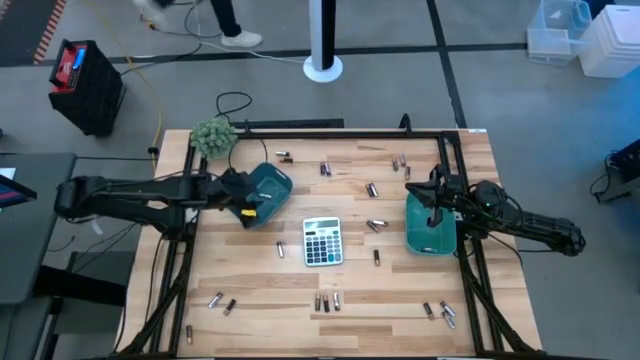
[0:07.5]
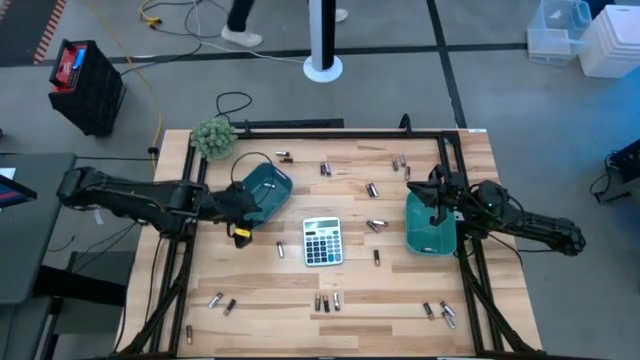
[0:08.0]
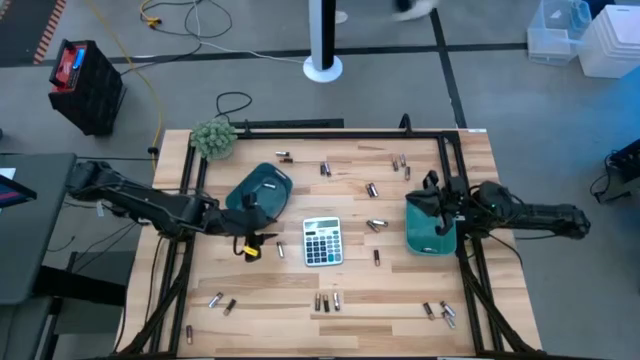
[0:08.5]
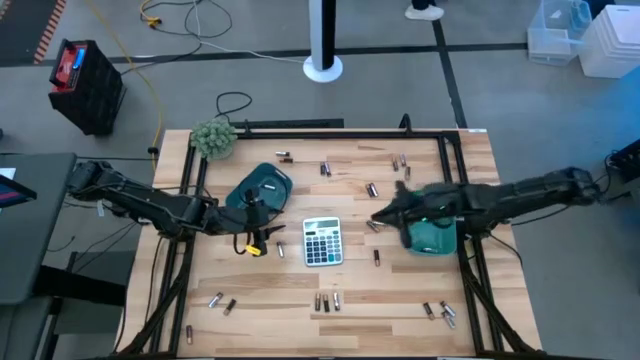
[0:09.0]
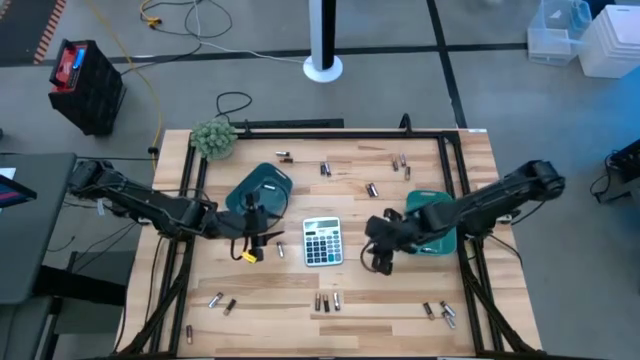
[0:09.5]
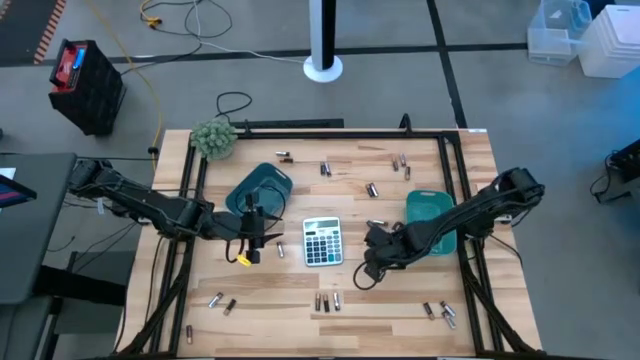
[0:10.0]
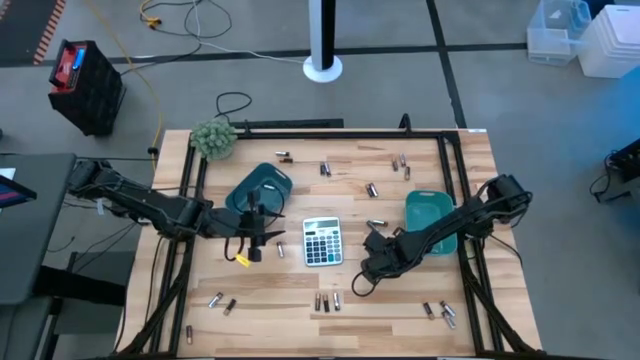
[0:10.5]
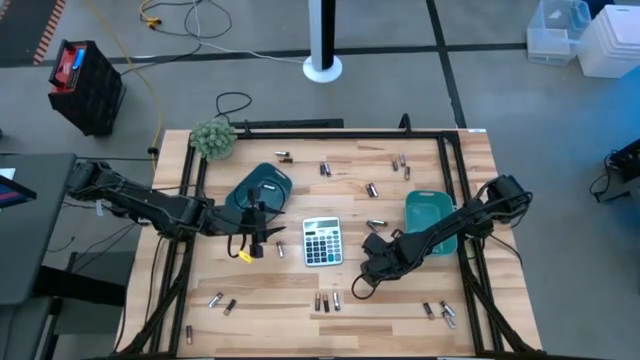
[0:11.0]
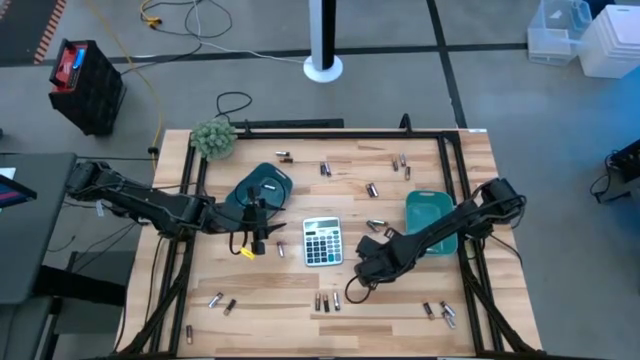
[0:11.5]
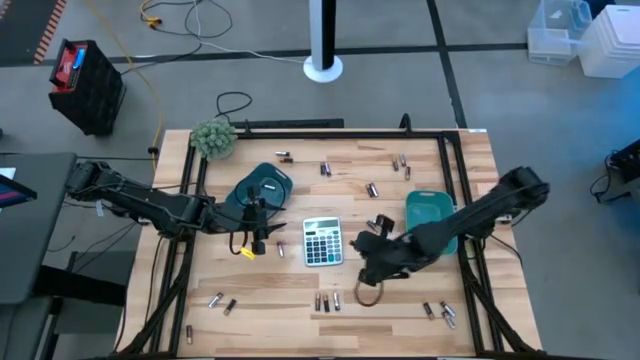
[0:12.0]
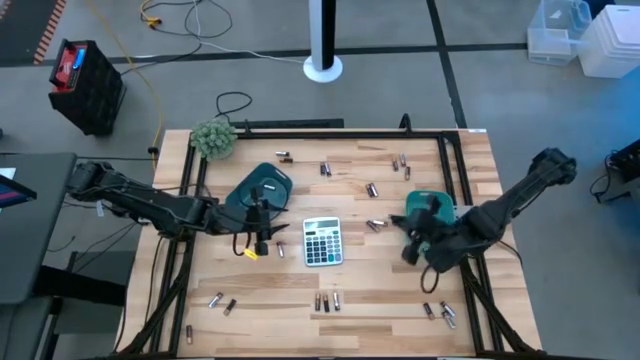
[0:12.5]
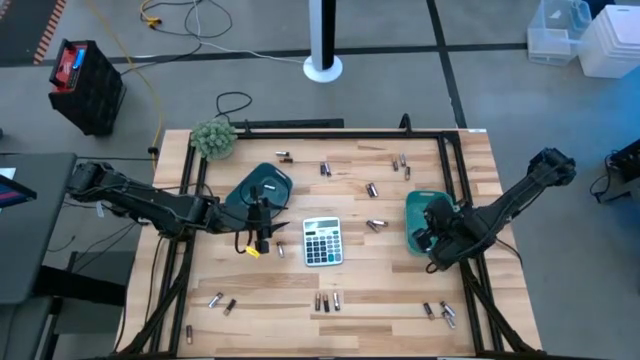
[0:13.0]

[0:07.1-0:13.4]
Task: Sort batteries
Put the brown/black battery into the green bin

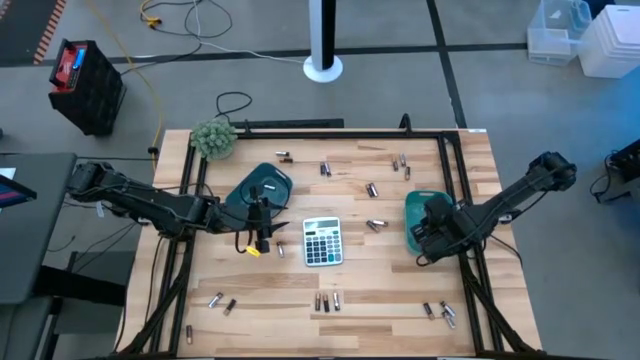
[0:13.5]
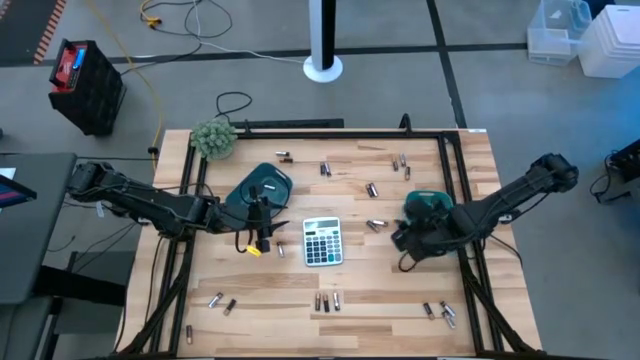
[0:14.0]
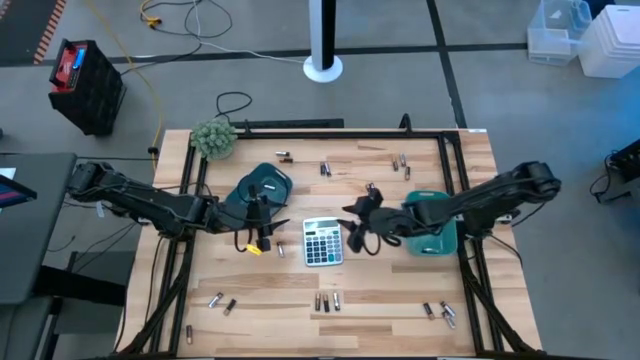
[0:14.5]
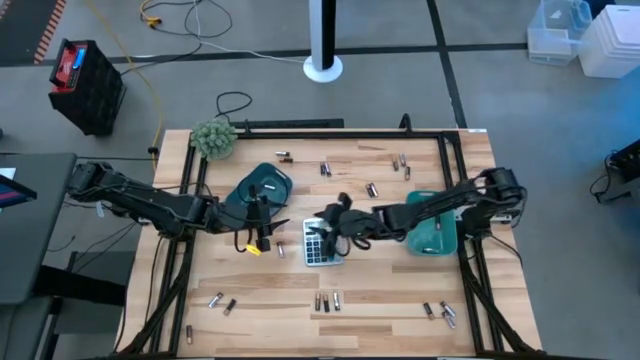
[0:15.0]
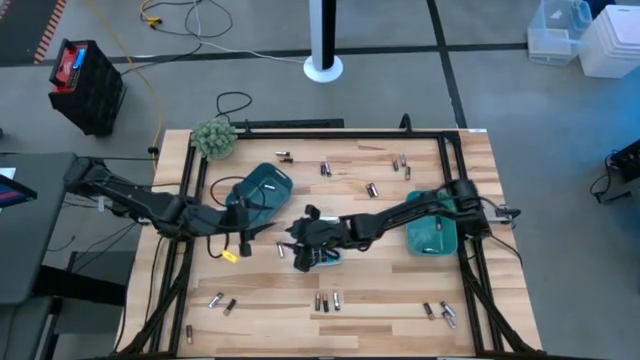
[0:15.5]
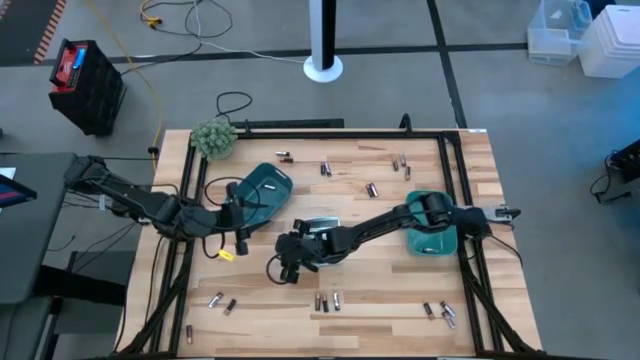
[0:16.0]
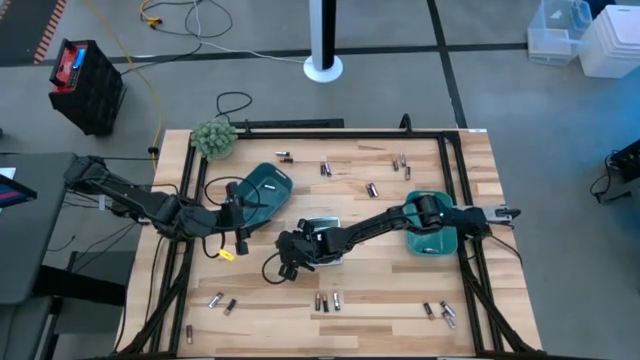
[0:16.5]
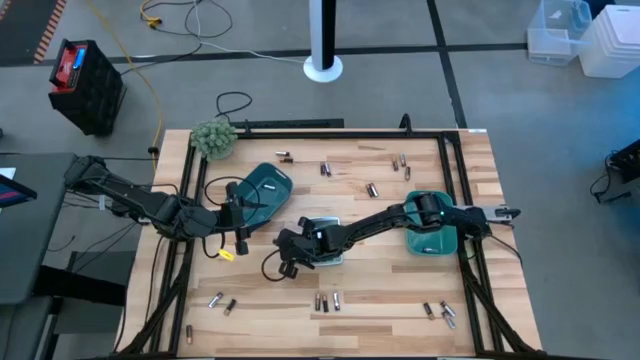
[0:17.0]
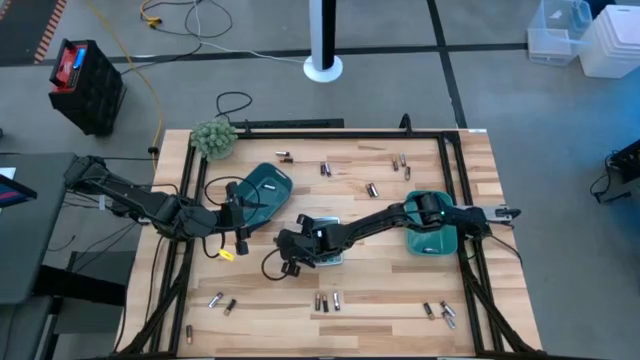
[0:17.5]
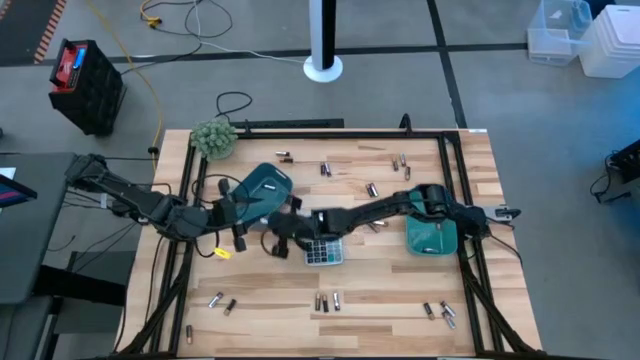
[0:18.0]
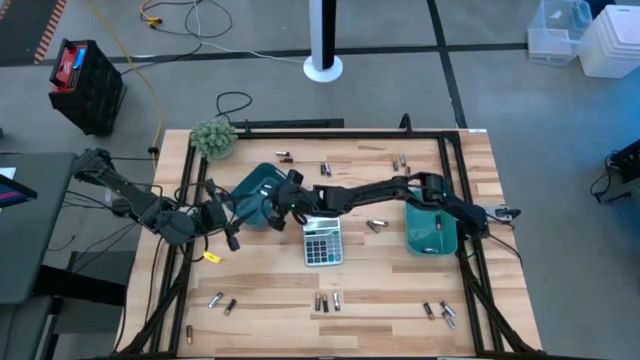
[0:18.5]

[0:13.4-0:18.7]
Put the silver/black battery into the blue bin

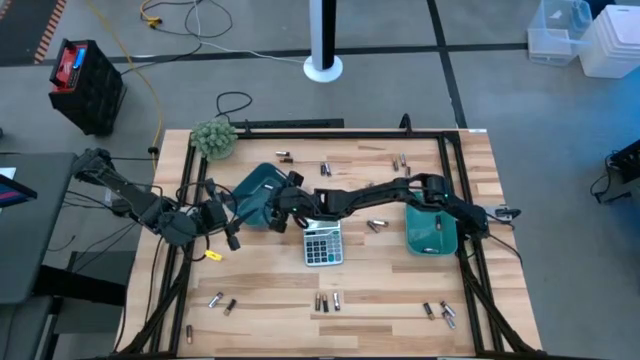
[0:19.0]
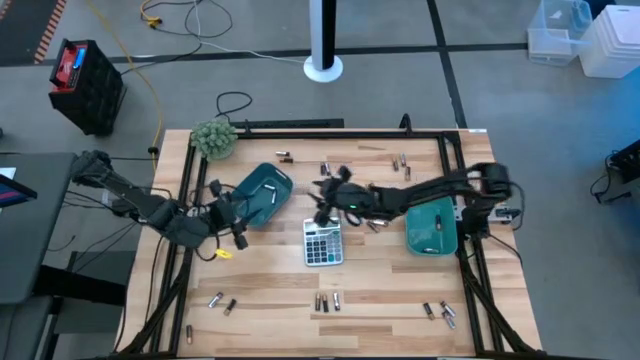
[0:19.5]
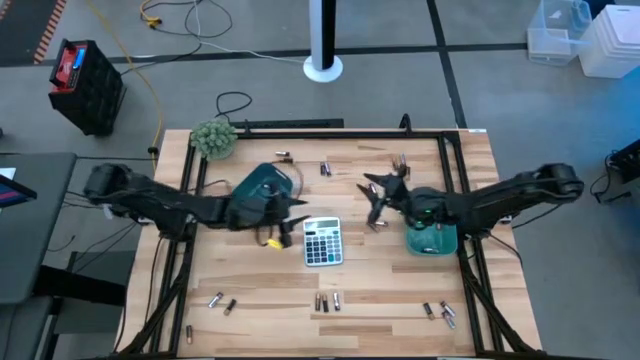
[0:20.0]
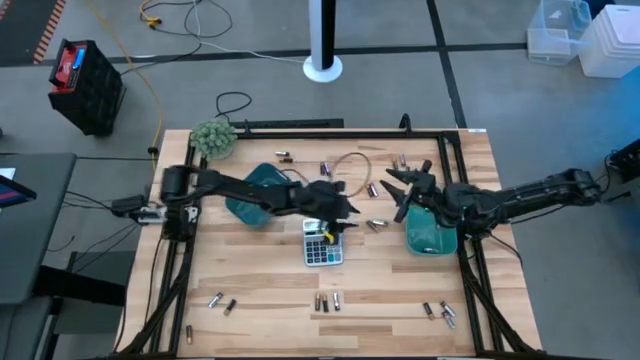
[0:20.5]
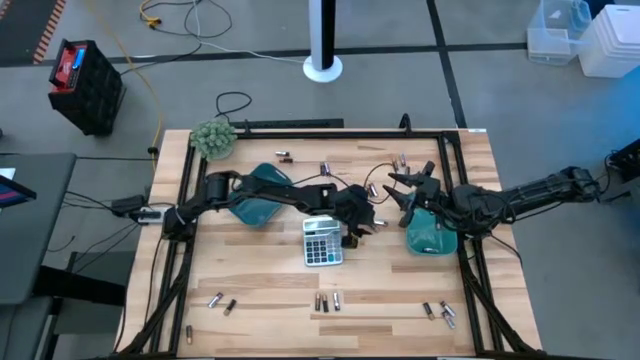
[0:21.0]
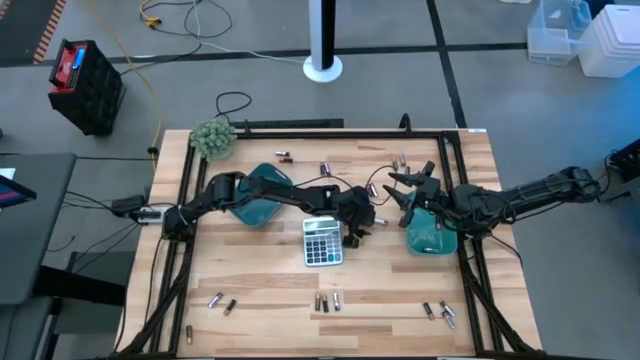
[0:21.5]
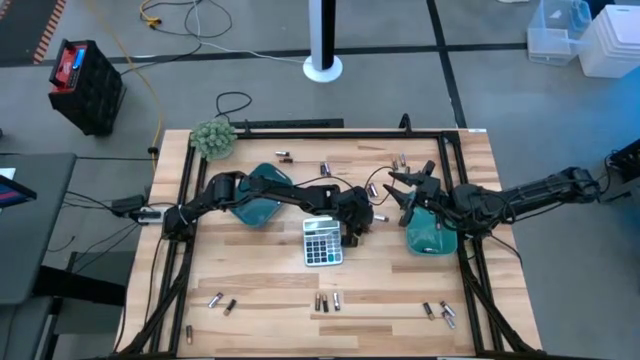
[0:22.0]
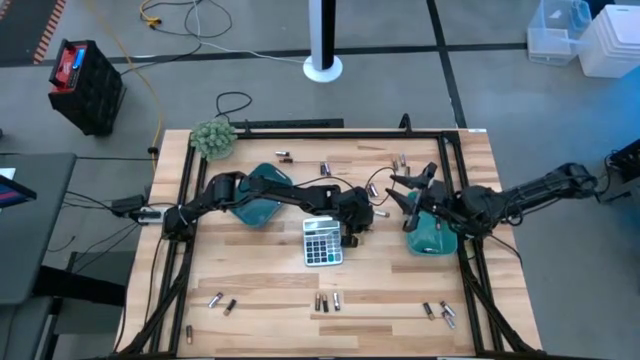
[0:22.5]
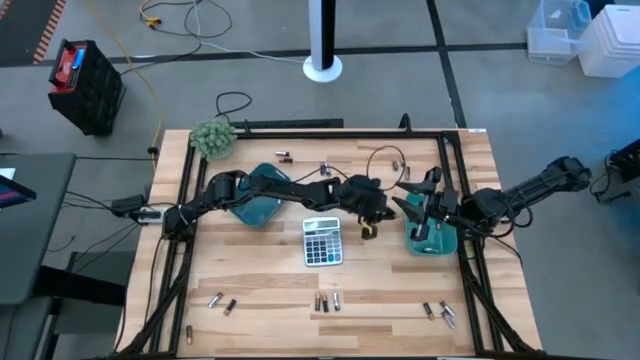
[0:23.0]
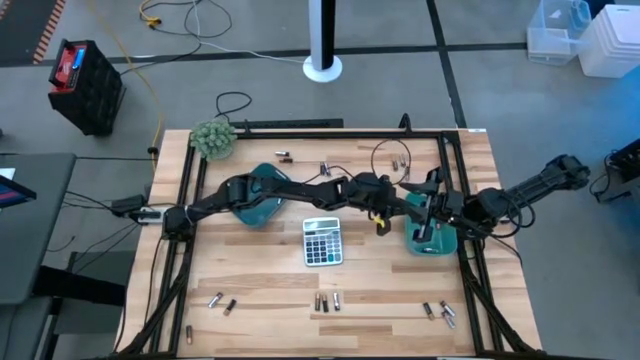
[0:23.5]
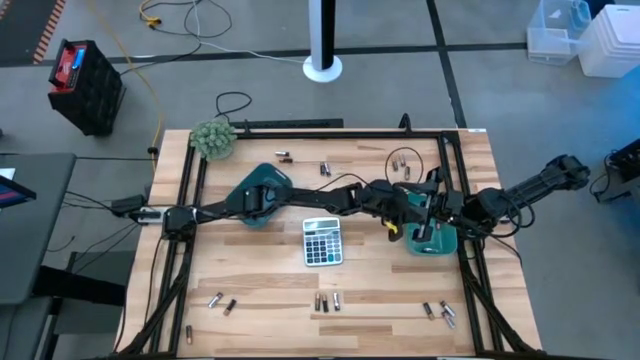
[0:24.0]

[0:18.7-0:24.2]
Put the brown/black battery into the green bin

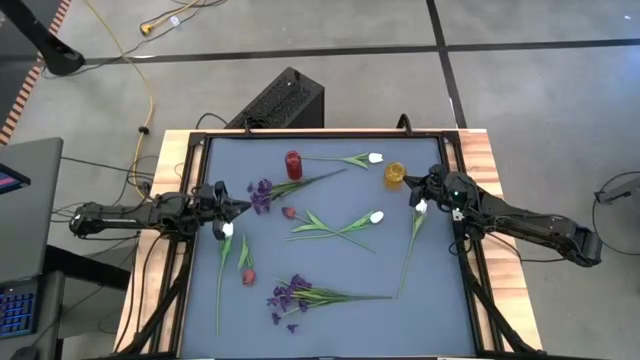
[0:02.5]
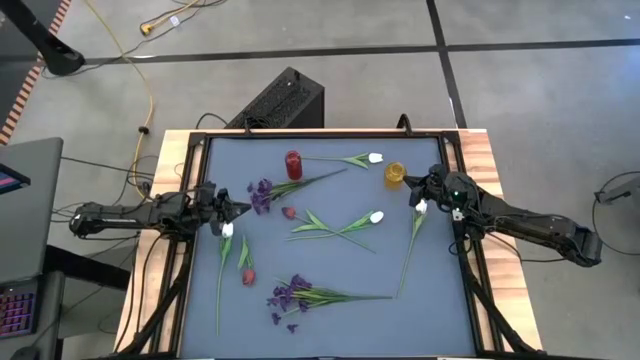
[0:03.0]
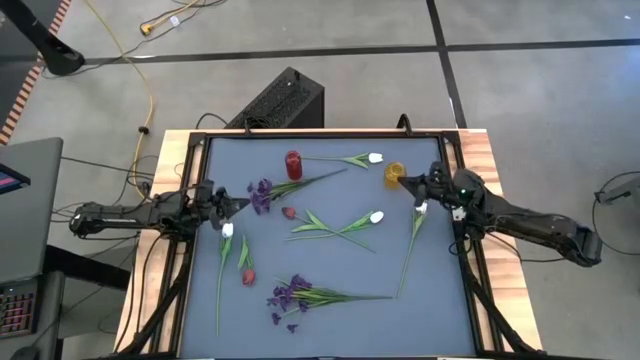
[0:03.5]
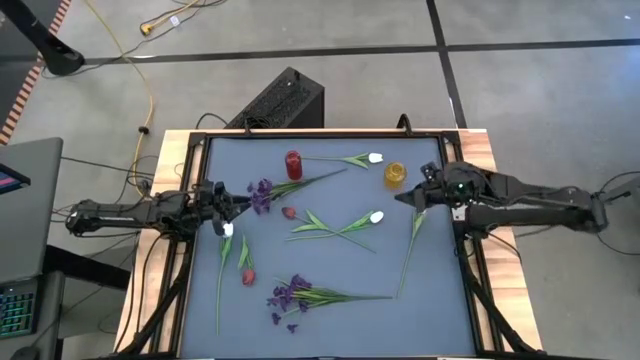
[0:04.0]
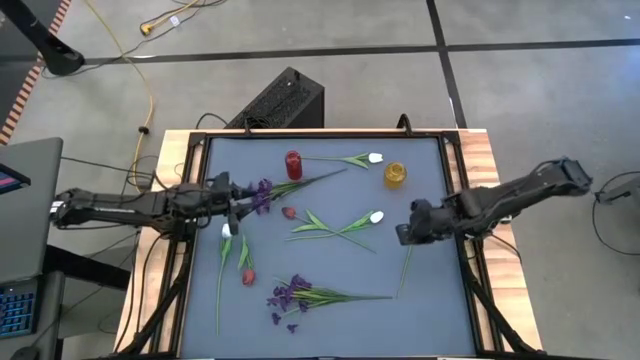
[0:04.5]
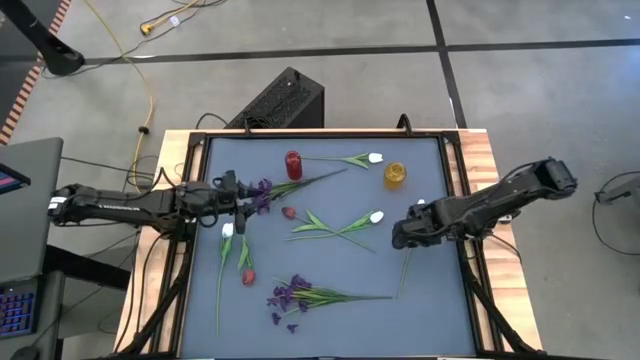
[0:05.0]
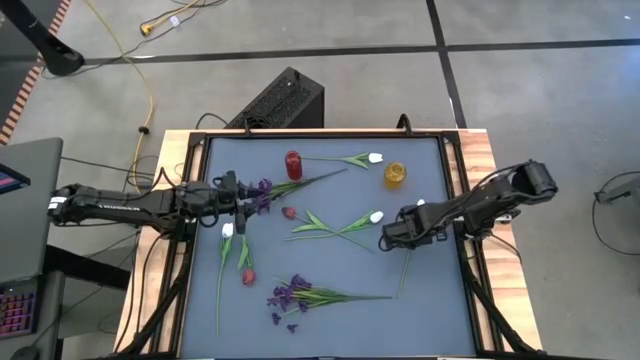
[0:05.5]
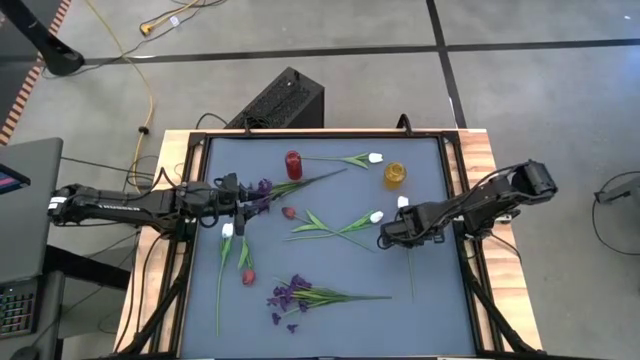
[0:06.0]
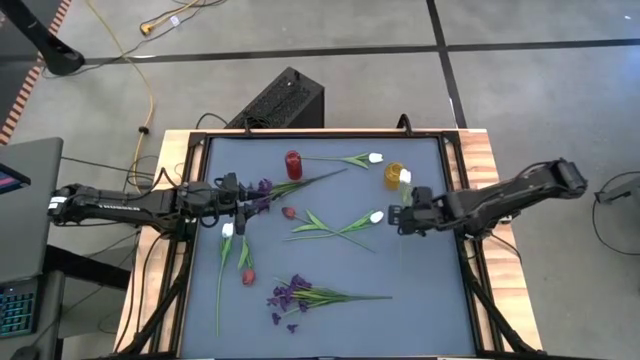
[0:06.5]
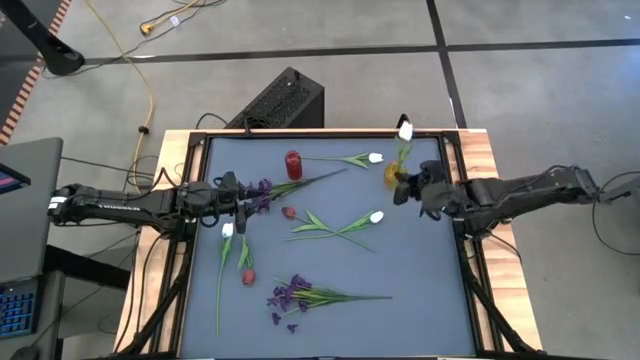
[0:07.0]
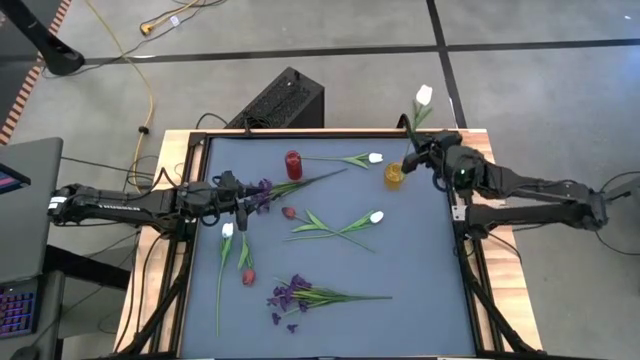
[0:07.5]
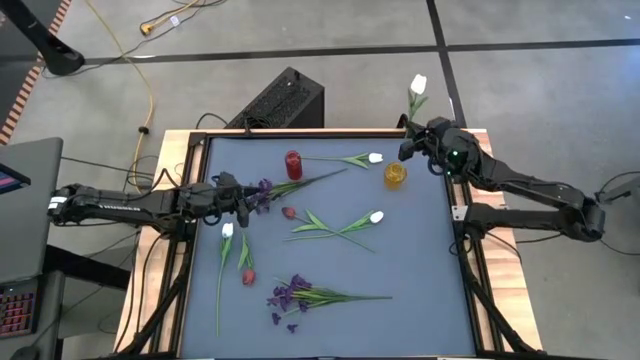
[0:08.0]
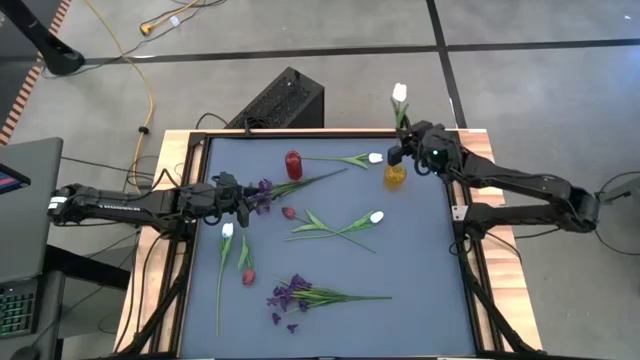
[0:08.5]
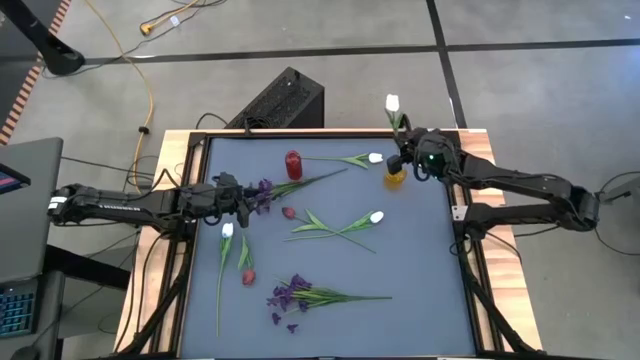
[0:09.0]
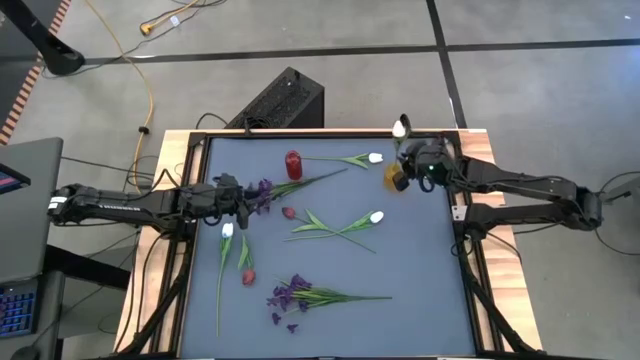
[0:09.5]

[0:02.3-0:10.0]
Task: Sort flowers into vase by color
Put the white flower into the yellow vase
